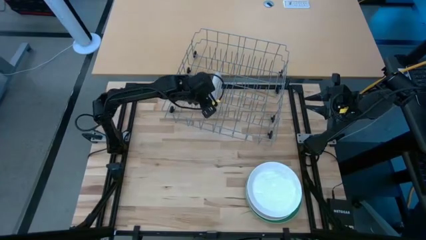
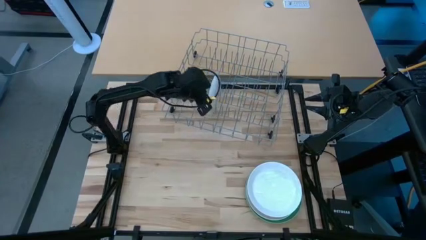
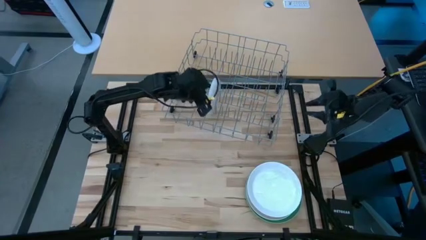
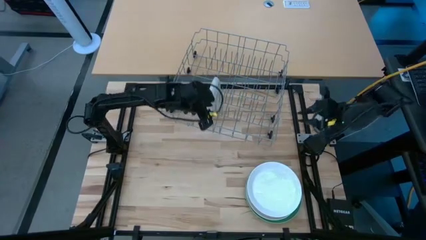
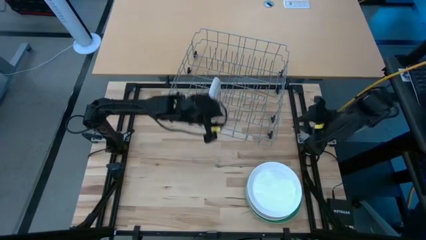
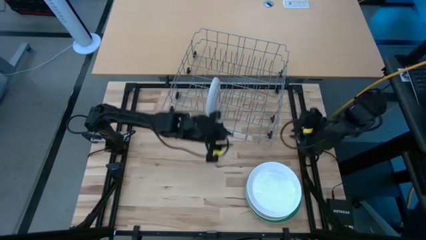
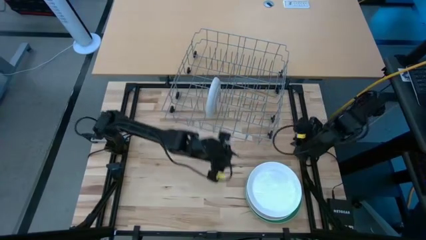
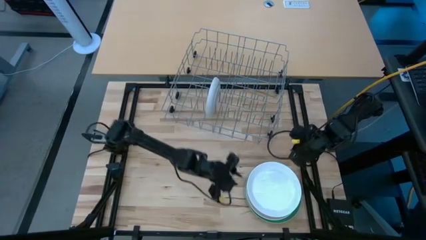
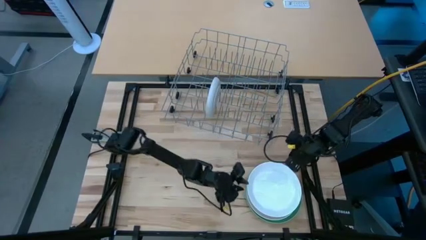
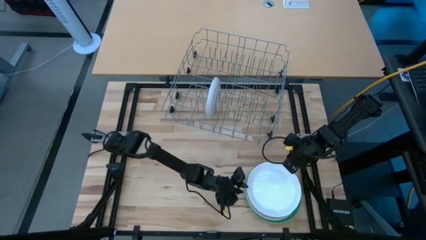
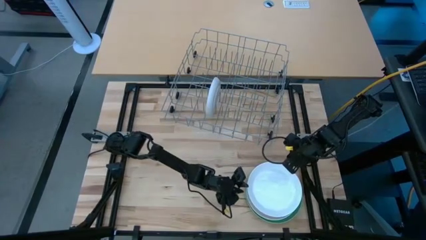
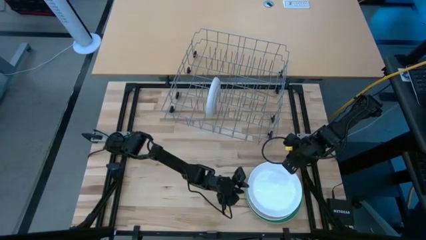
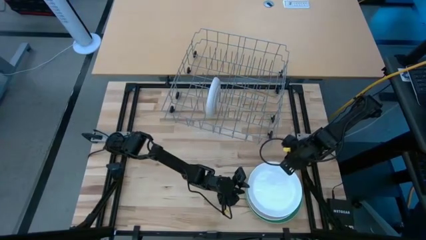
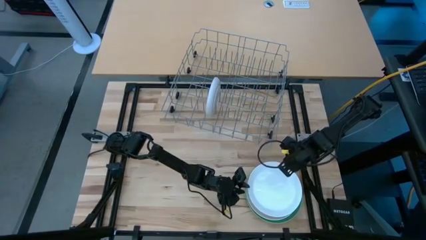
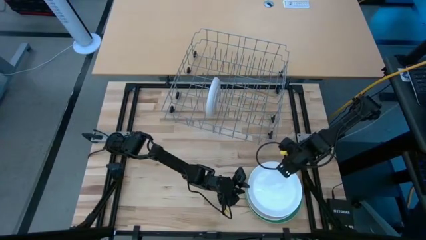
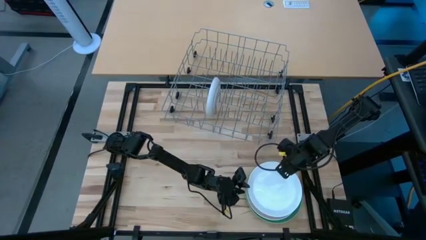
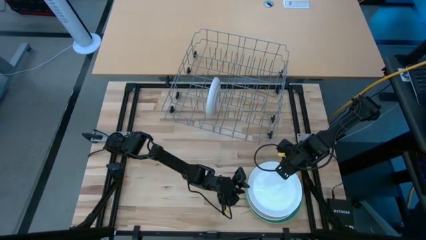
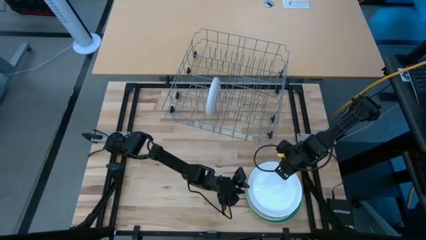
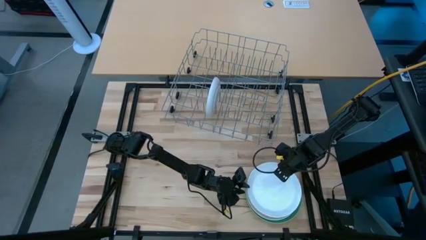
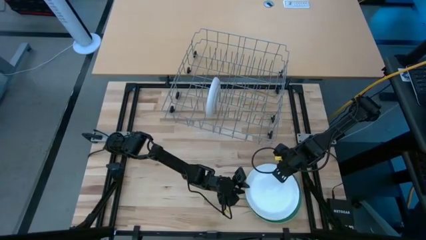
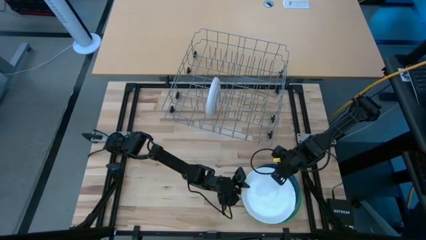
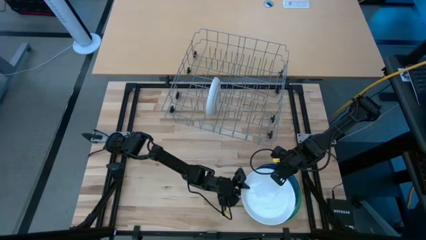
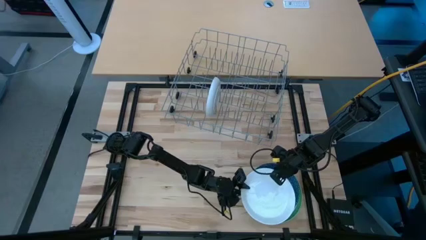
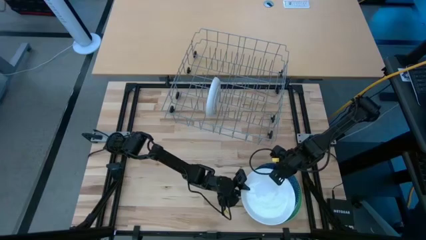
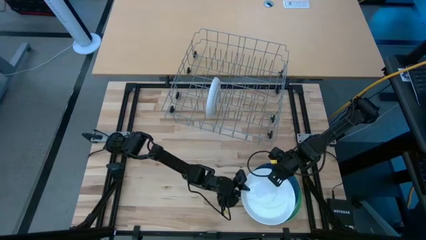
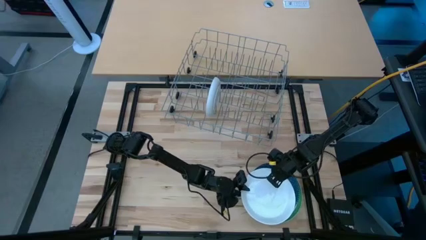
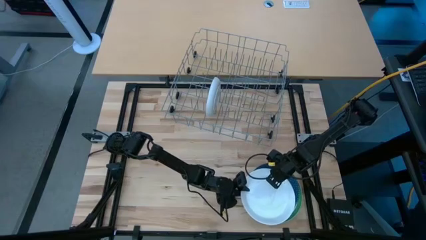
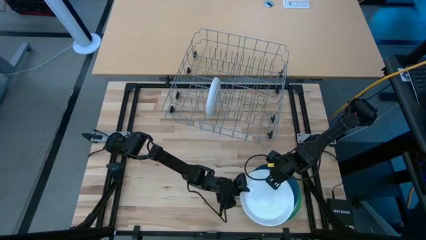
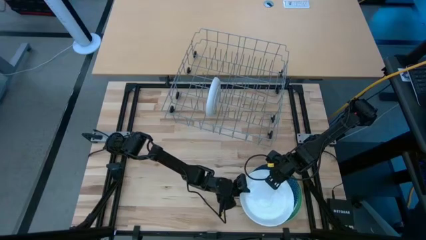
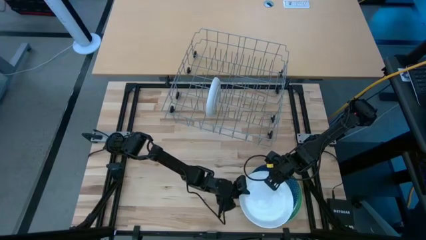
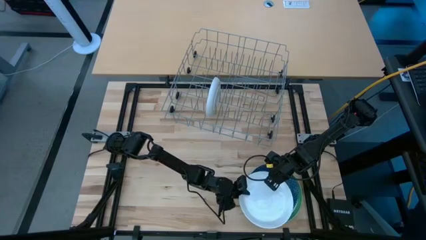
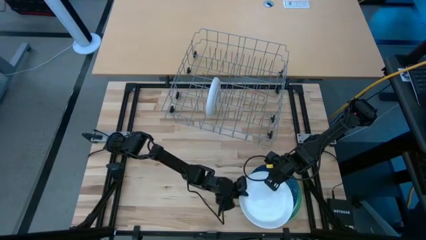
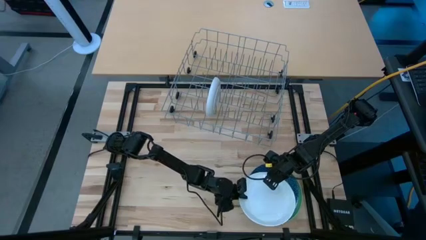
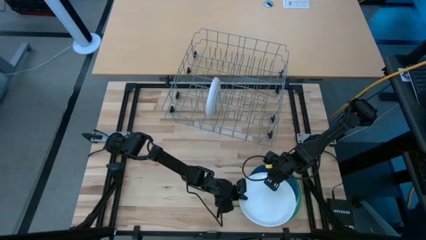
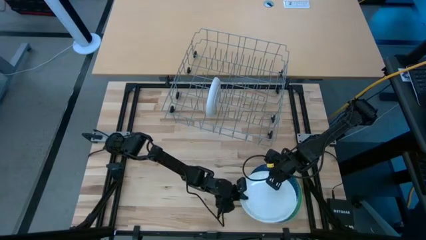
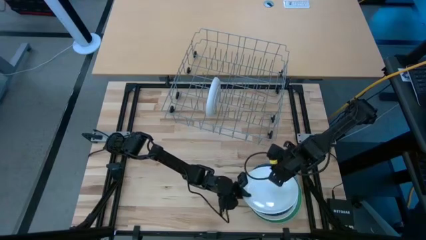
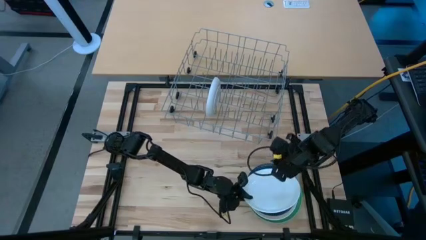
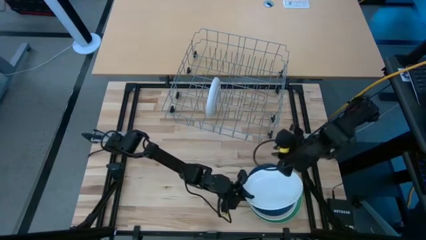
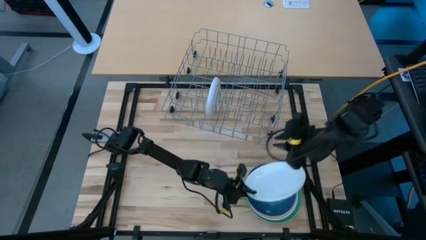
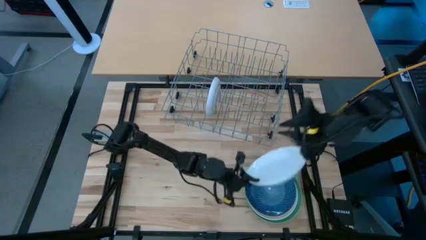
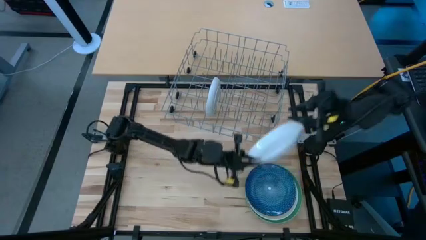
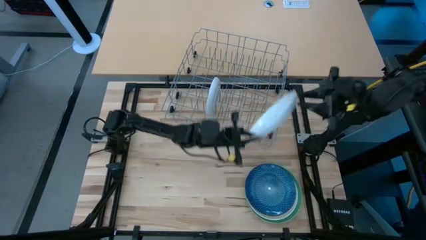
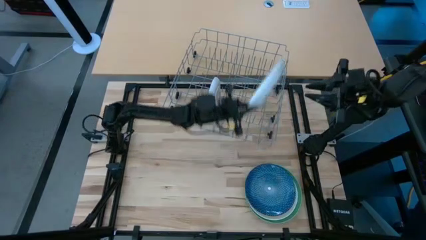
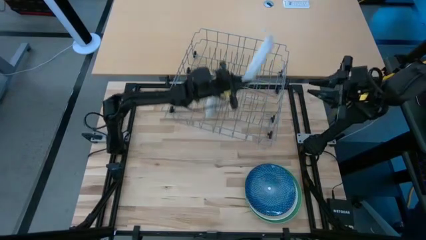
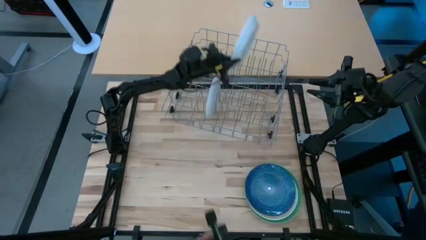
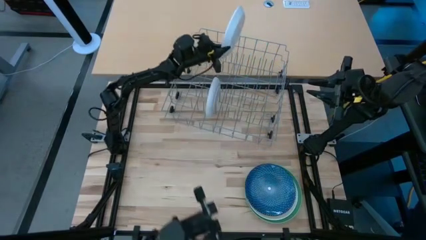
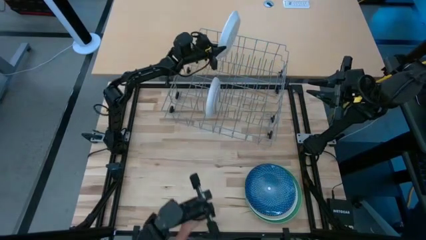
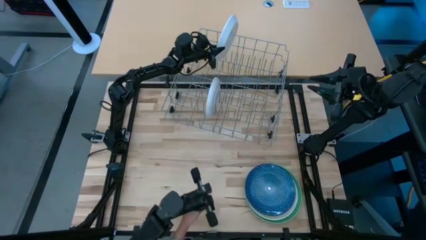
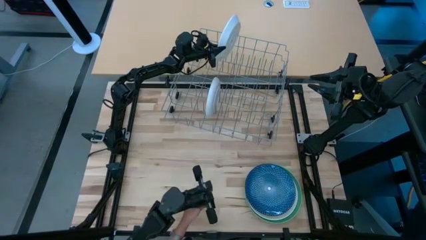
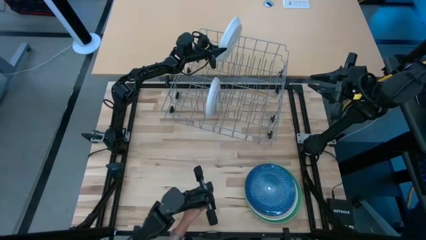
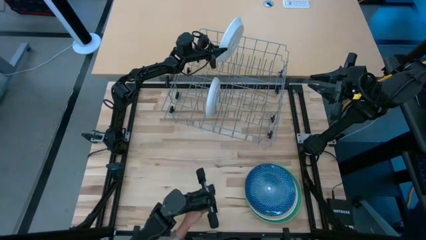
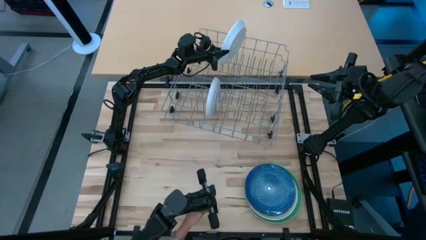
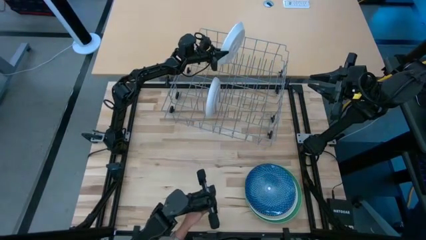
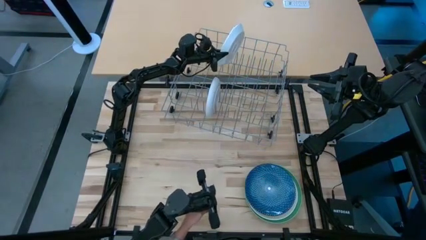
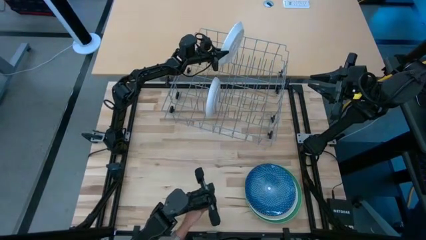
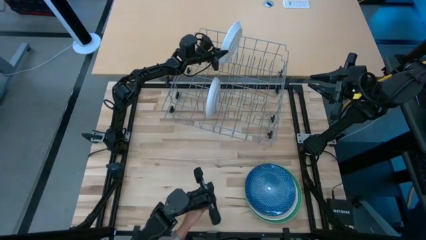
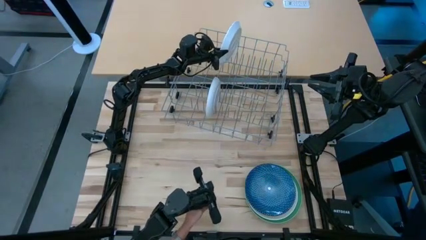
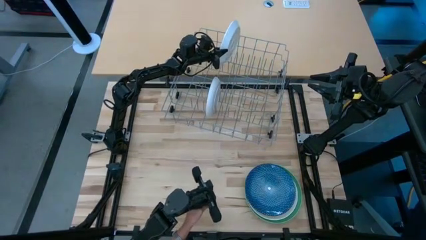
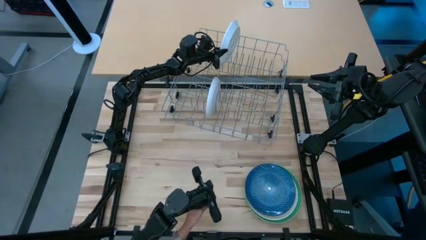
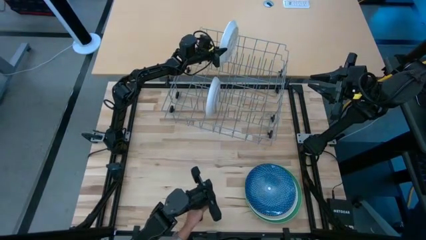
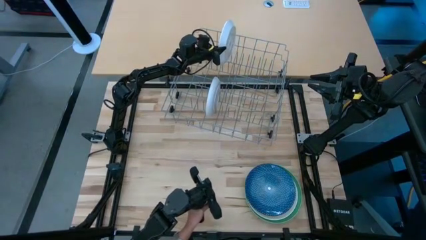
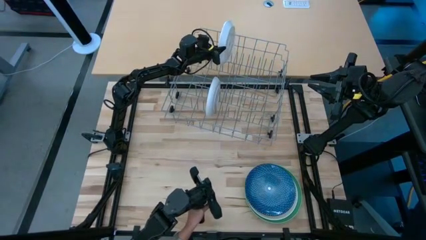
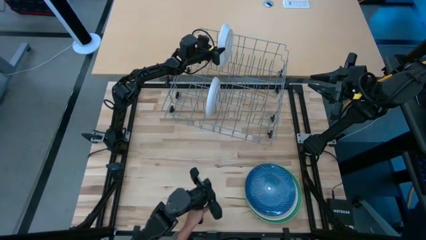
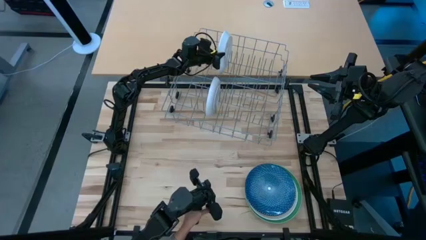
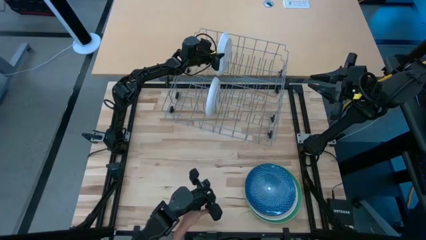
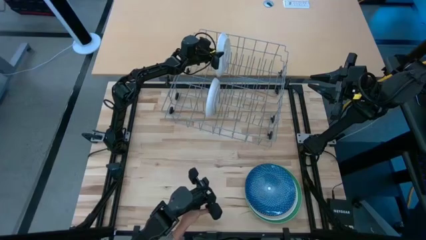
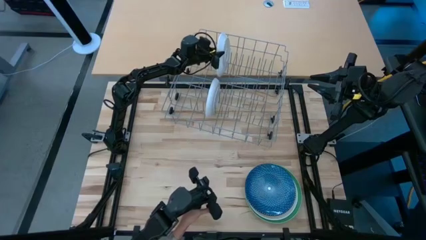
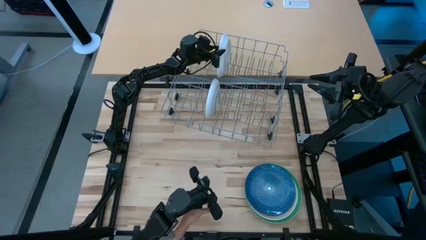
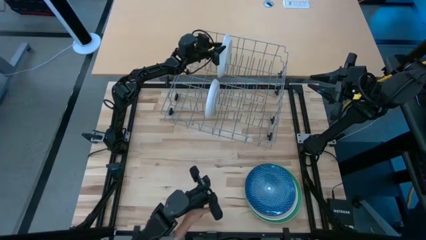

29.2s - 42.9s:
Task: Sort dishes
Put the white plate into the gray dishwasher rack
